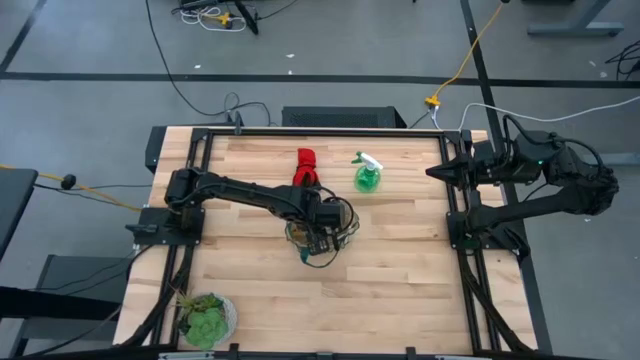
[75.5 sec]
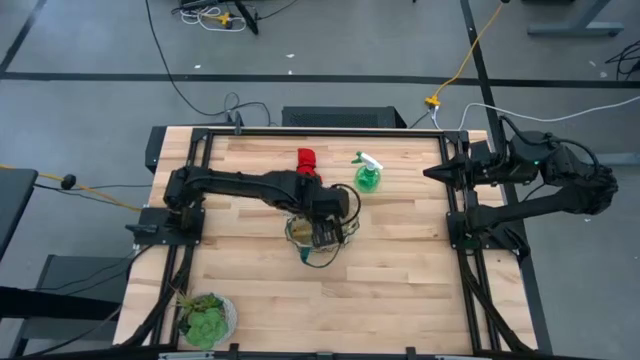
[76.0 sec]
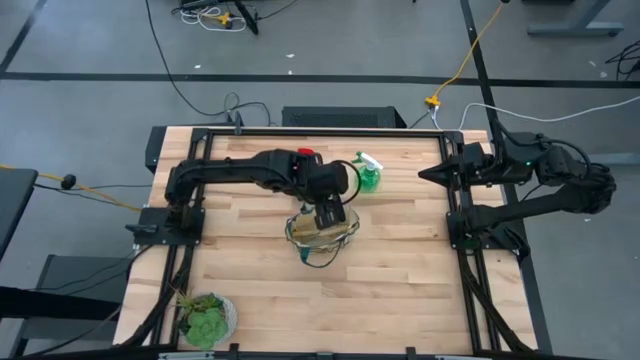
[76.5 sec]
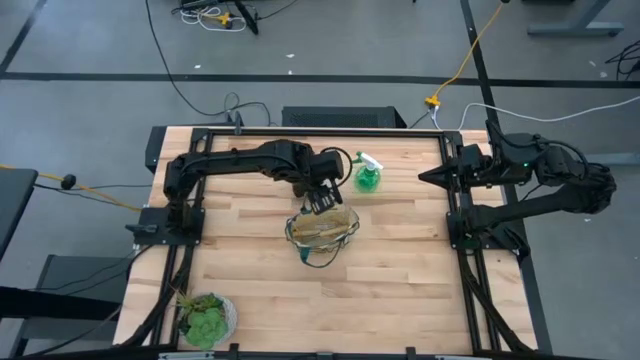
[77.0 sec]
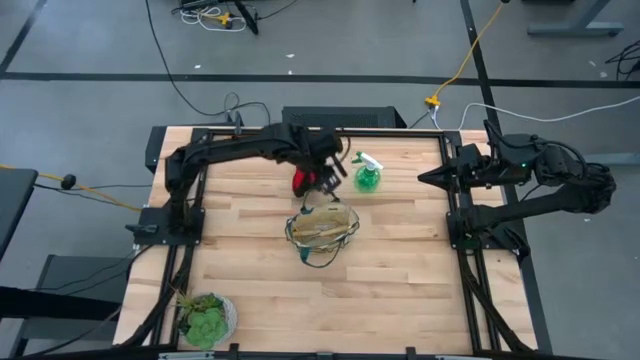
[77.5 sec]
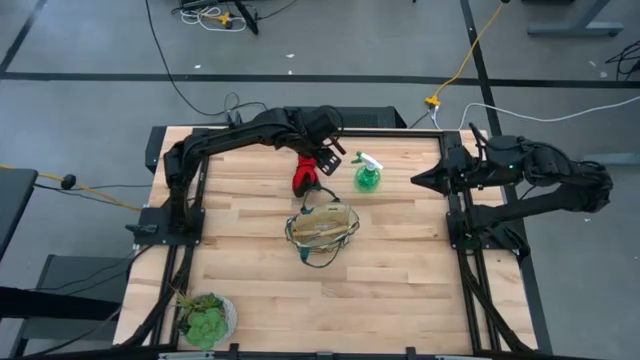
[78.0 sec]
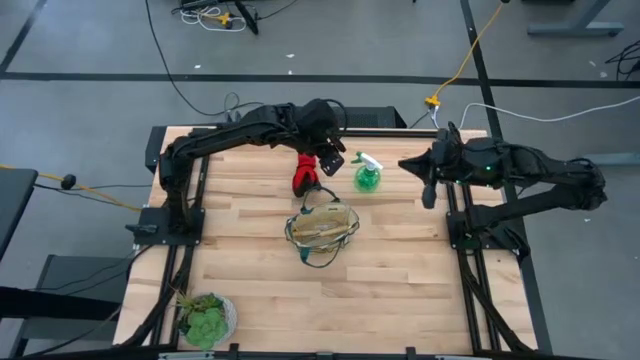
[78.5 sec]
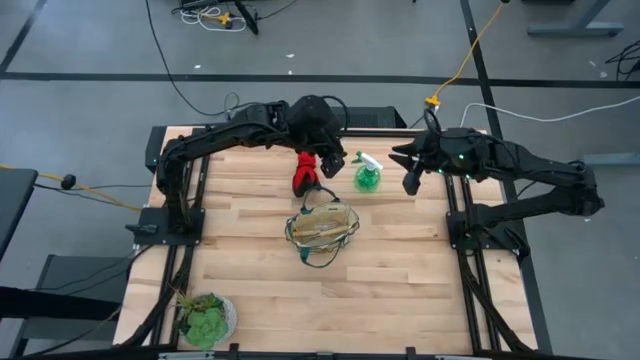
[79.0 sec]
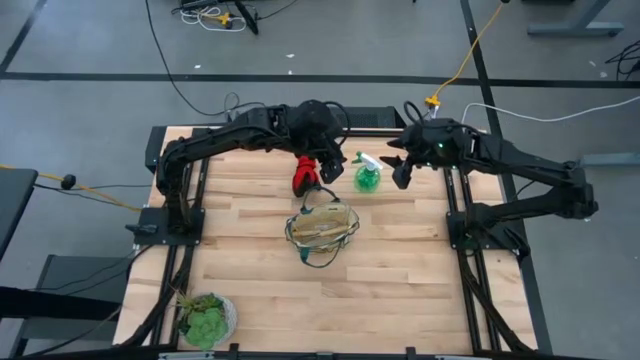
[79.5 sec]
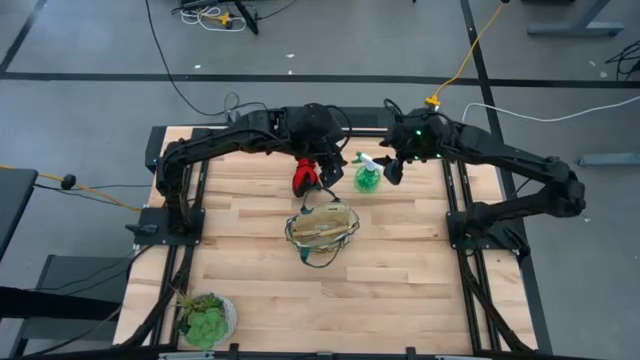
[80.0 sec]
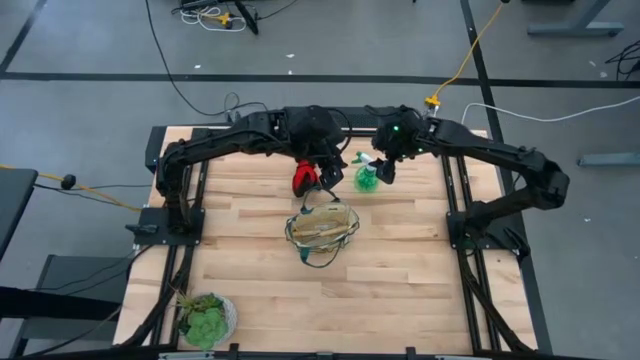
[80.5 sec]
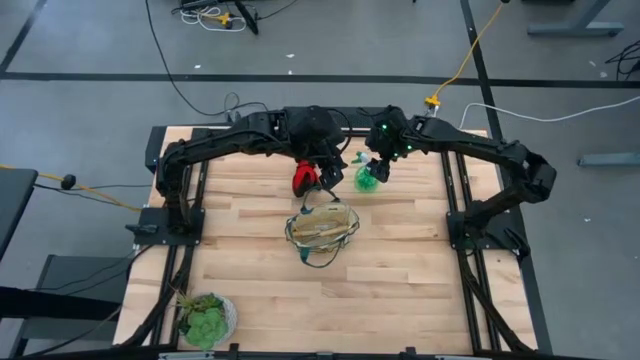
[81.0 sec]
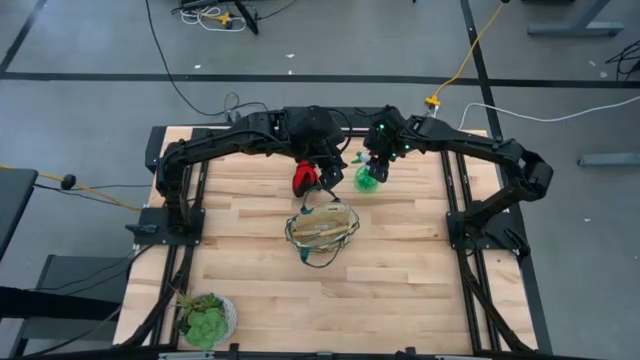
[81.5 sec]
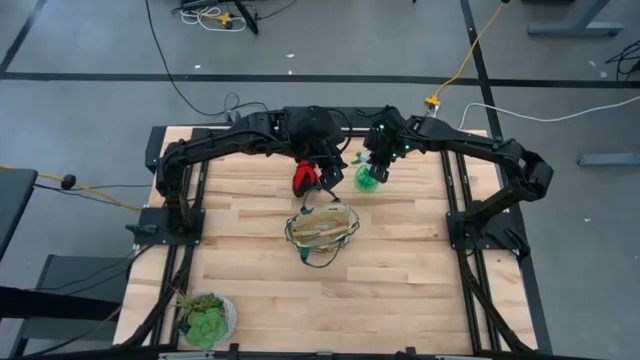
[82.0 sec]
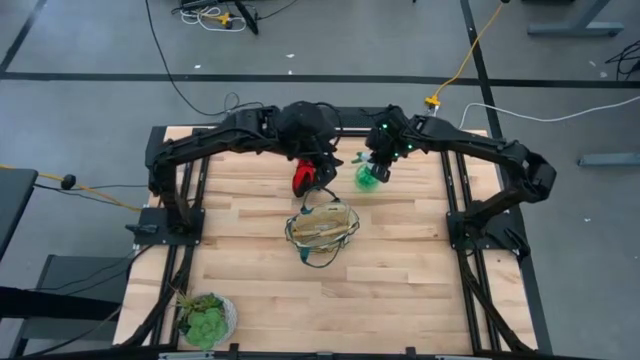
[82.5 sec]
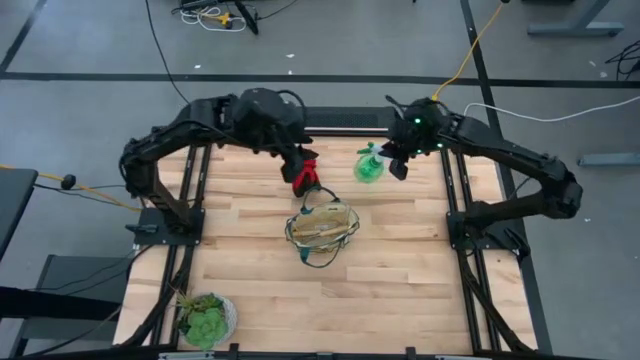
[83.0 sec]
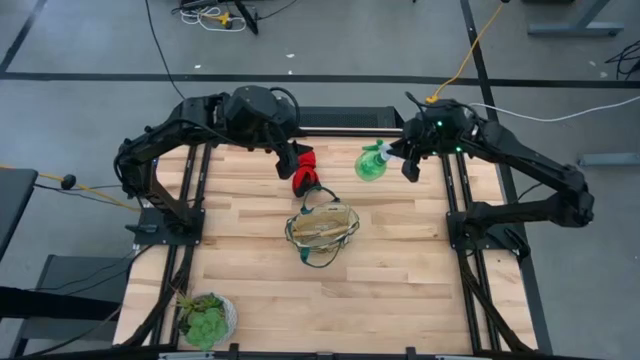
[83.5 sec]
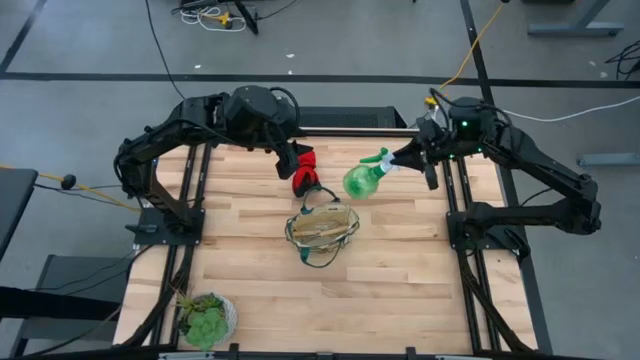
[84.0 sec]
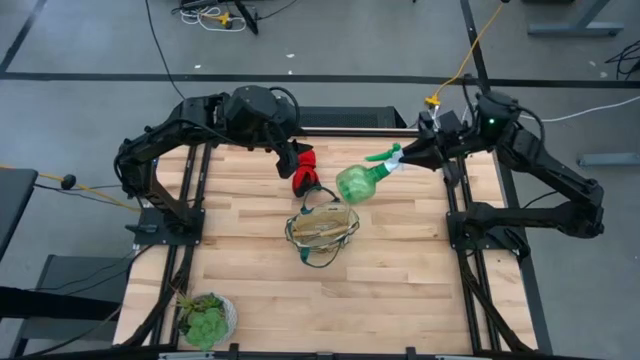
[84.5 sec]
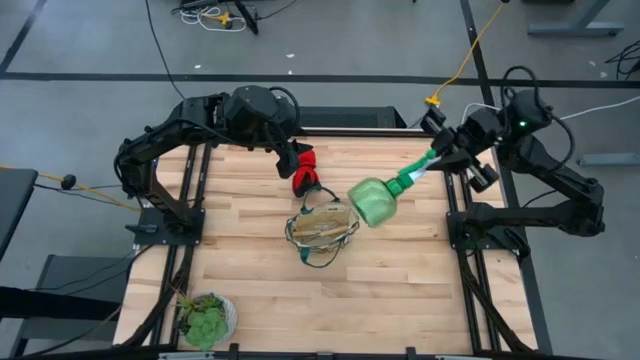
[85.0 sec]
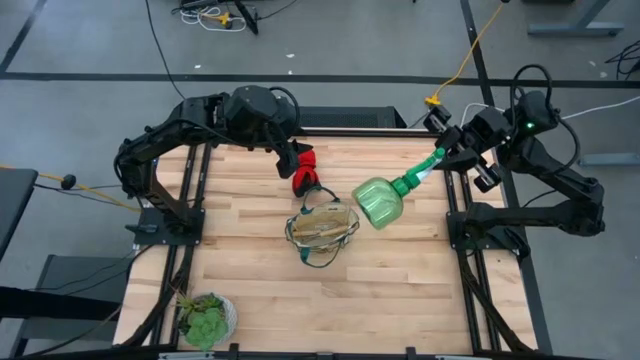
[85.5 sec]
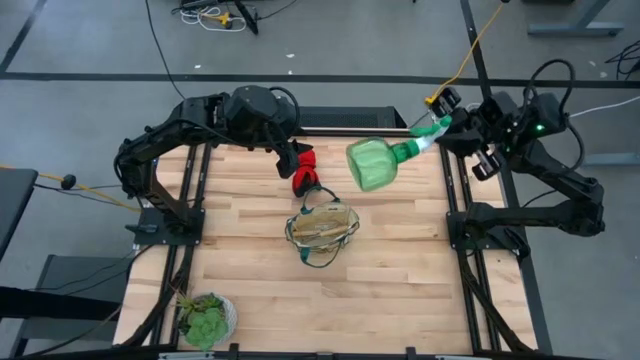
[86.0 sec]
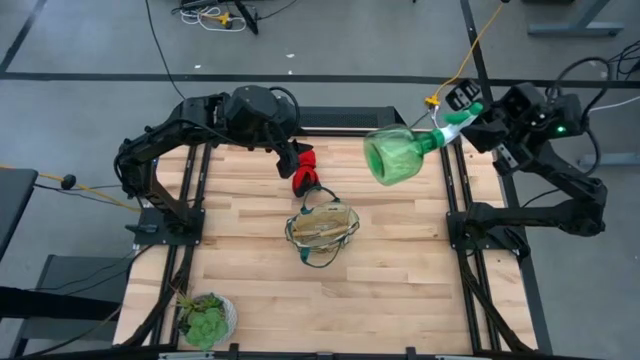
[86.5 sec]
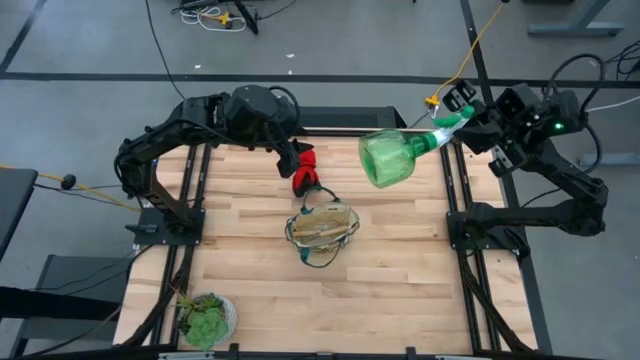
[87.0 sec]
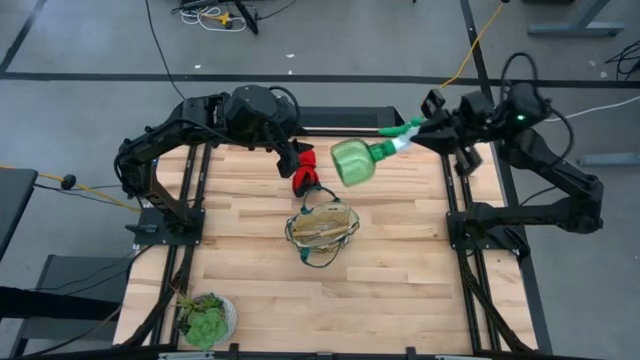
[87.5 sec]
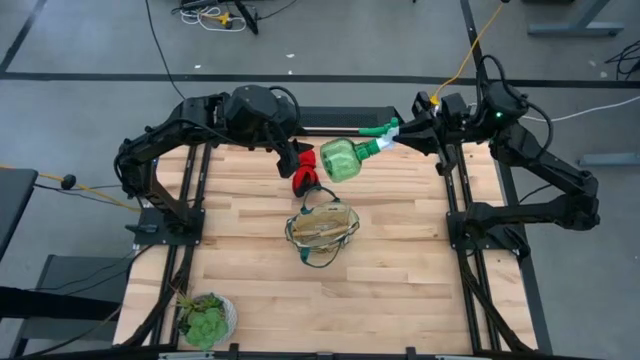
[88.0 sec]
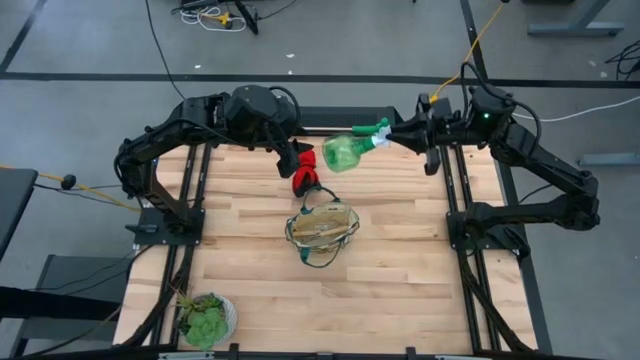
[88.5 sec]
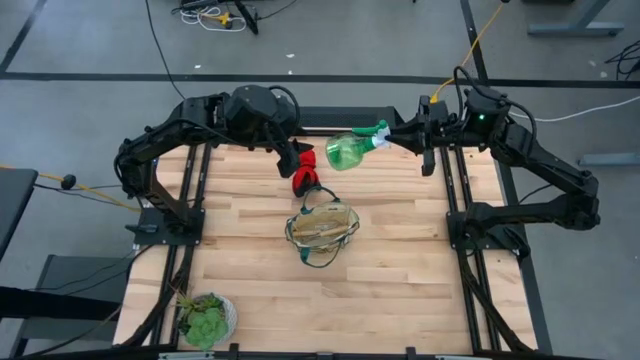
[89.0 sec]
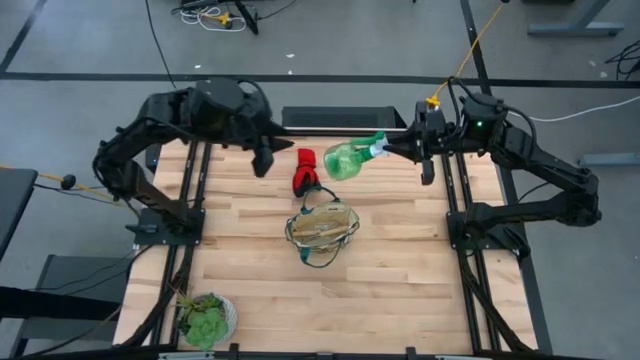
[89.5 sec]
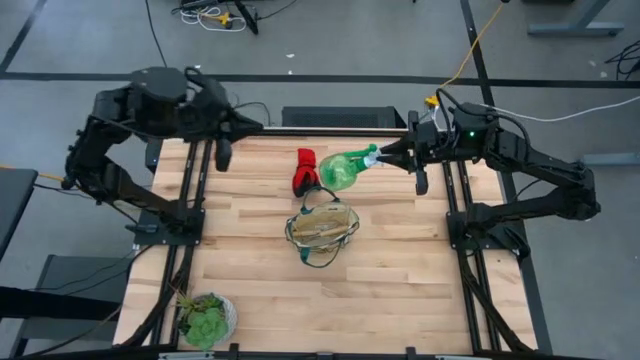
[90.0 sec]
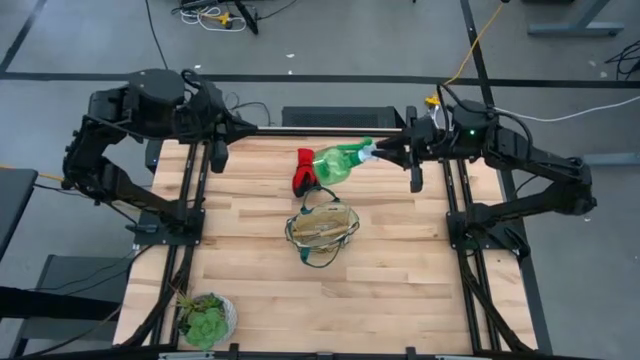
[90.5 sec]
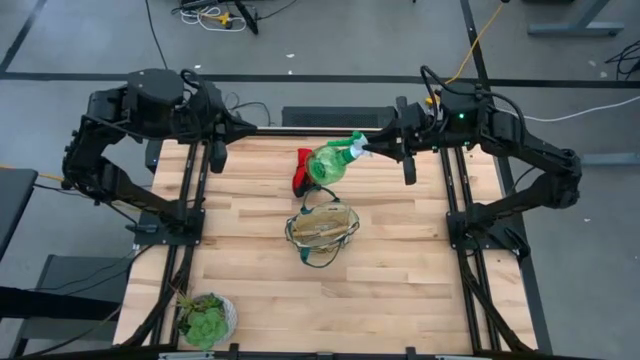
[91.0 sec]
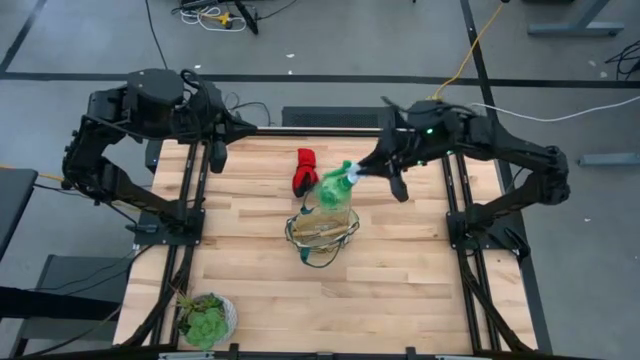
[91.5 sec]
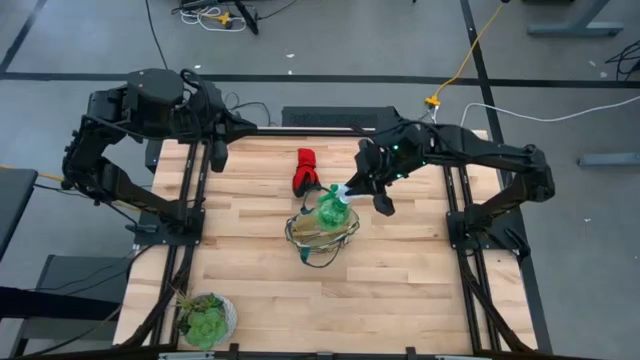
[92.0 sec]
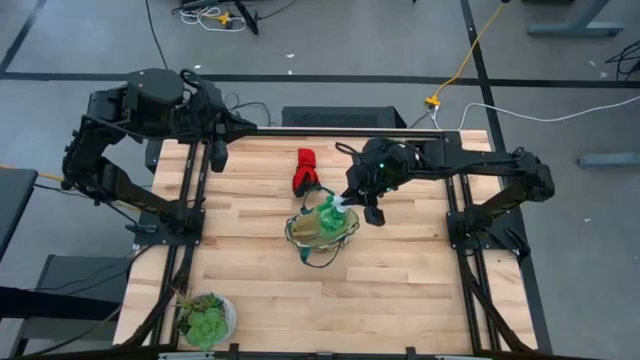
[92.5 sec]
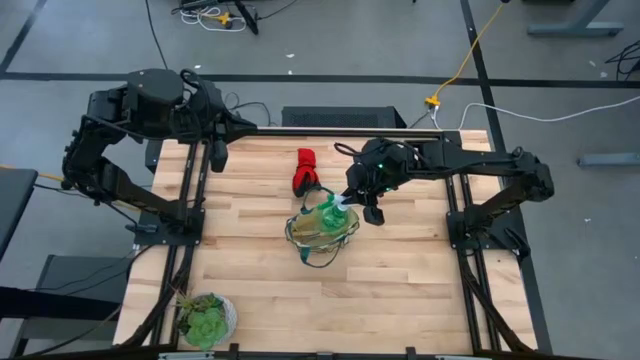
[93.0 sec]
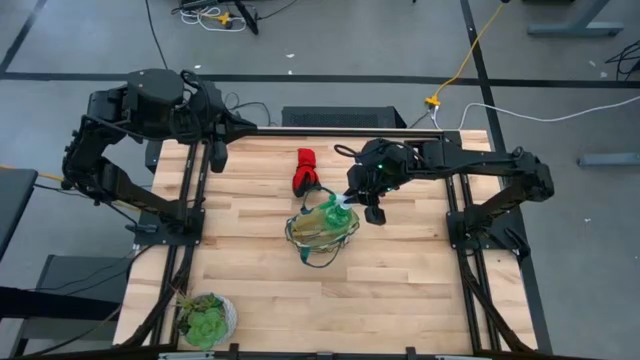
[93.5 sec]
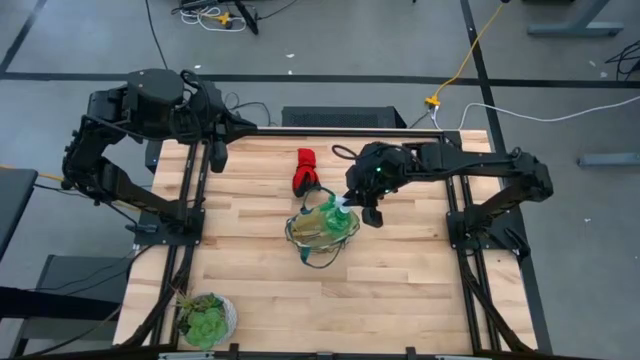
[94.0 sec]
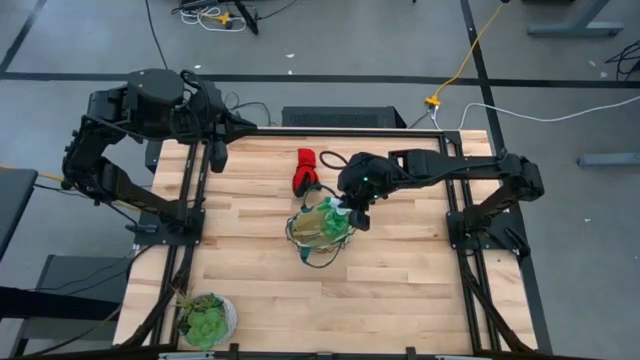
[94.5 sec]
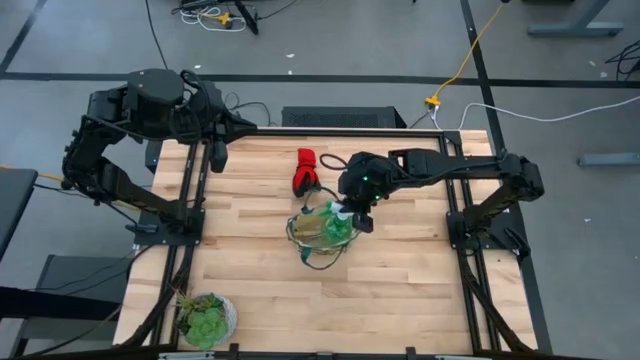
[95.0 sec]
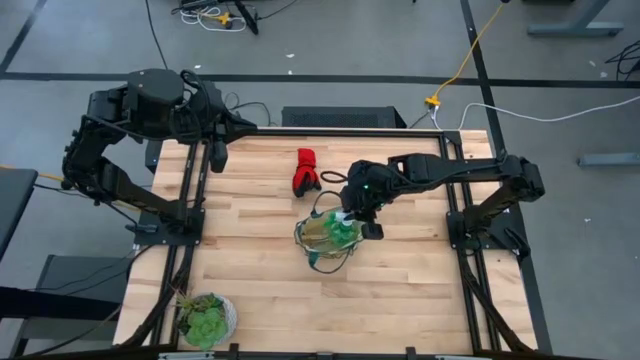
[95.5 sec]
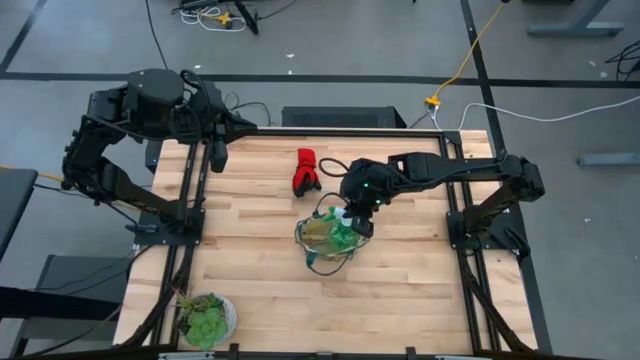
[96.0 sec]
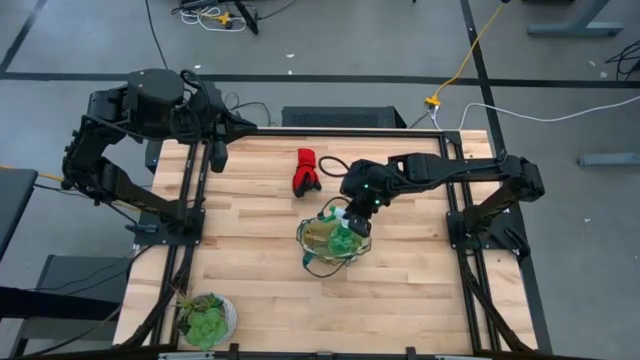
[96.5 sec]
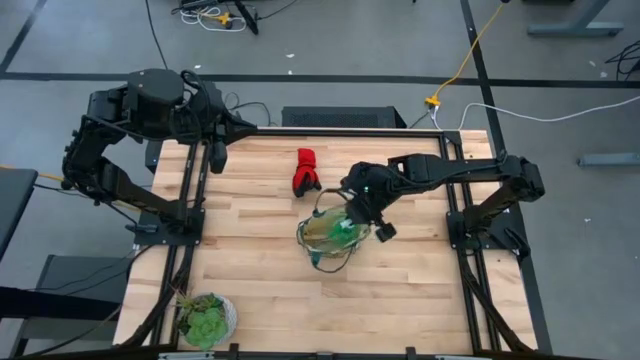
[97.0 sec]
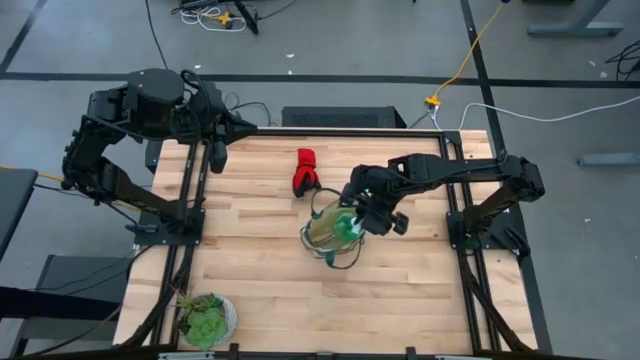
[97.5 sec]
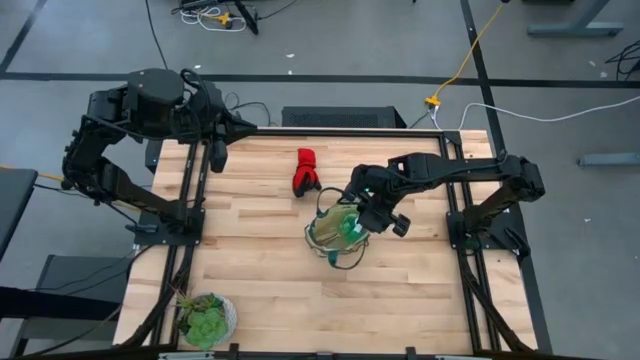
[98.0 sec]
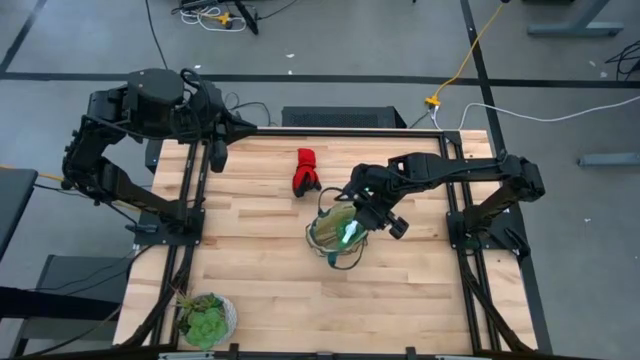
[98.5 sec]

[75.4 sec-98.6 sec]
Task: Pick & Place Garden tools in Gardening bag
Put the green spray bottle into the light brown and green gardening bag
